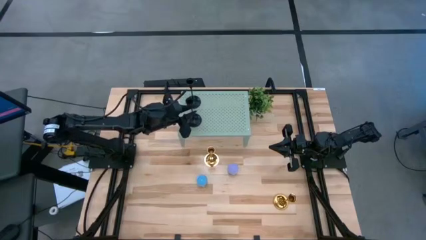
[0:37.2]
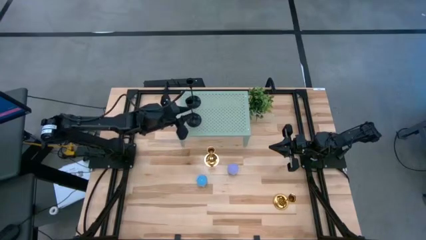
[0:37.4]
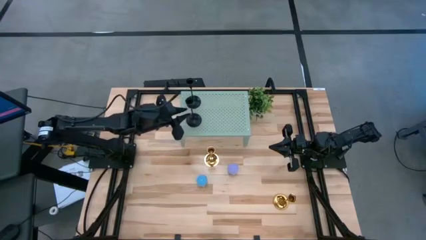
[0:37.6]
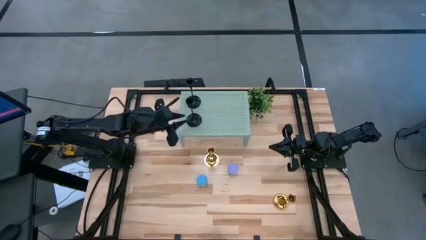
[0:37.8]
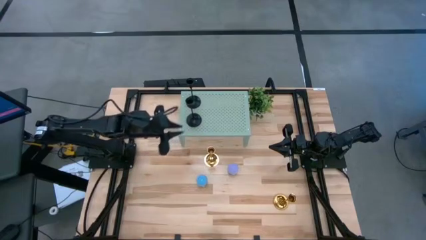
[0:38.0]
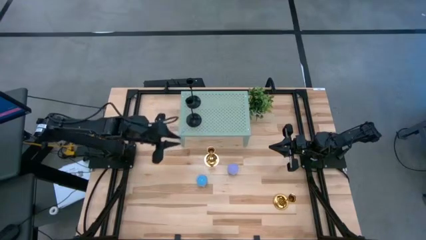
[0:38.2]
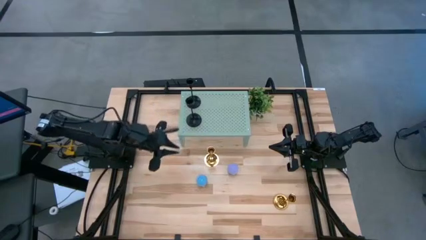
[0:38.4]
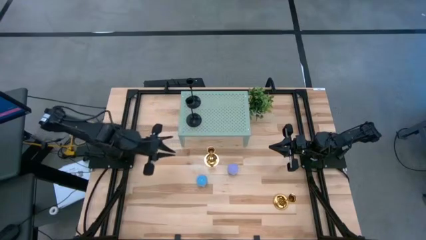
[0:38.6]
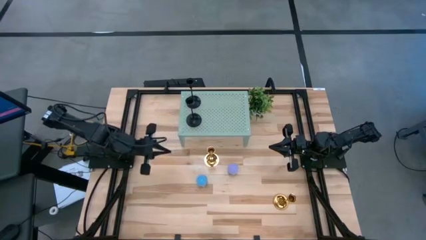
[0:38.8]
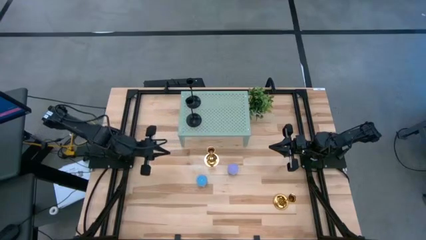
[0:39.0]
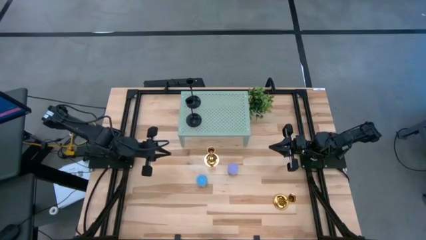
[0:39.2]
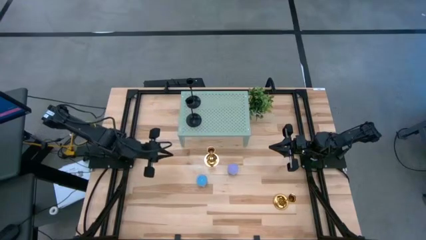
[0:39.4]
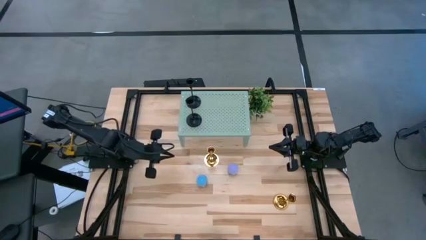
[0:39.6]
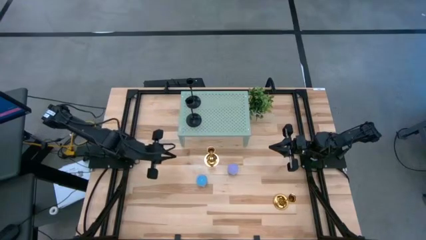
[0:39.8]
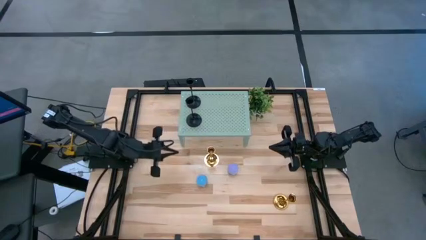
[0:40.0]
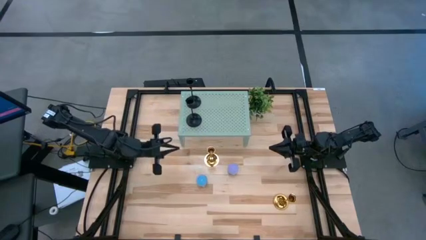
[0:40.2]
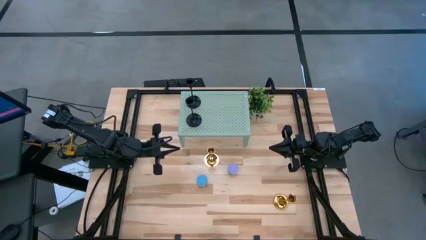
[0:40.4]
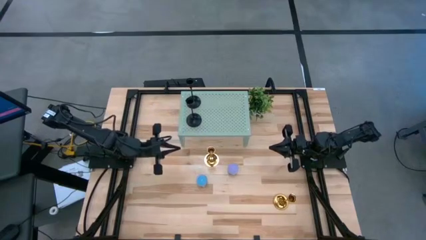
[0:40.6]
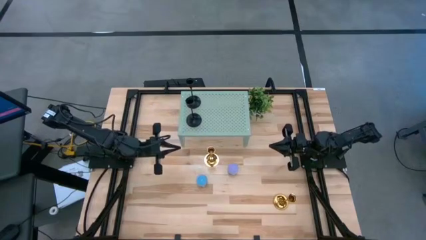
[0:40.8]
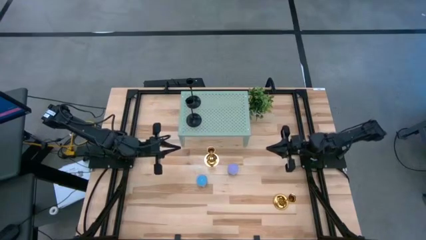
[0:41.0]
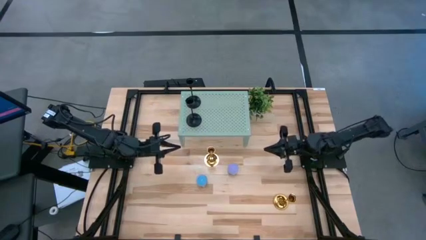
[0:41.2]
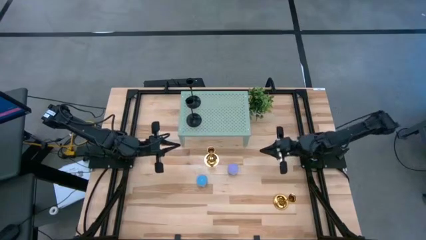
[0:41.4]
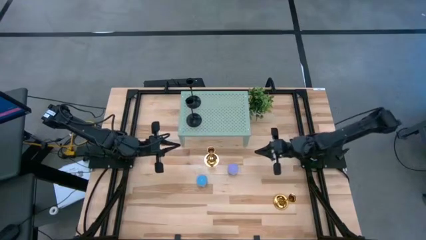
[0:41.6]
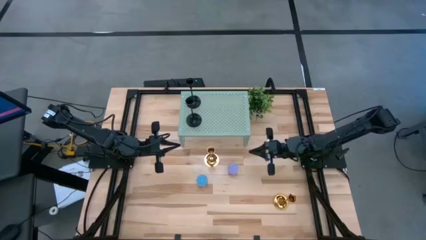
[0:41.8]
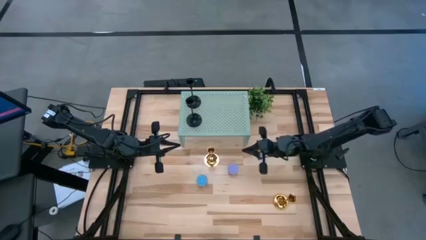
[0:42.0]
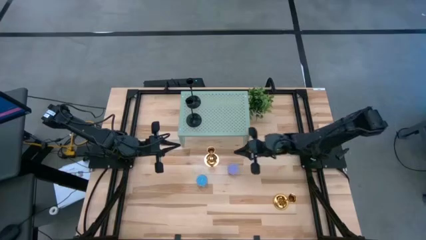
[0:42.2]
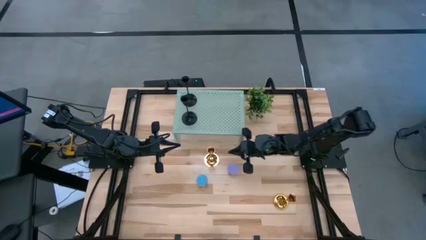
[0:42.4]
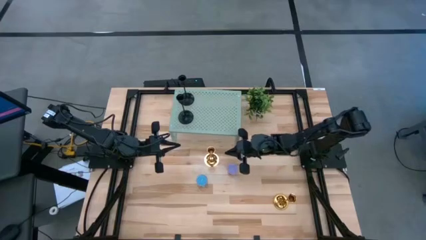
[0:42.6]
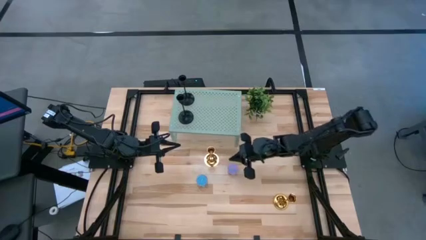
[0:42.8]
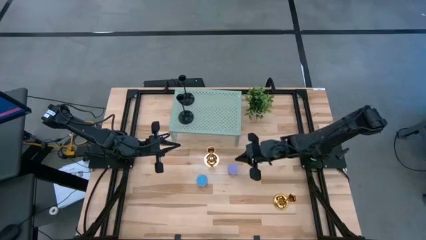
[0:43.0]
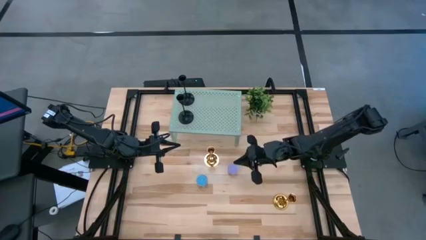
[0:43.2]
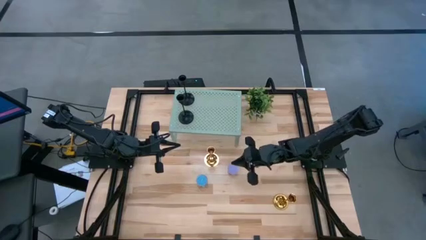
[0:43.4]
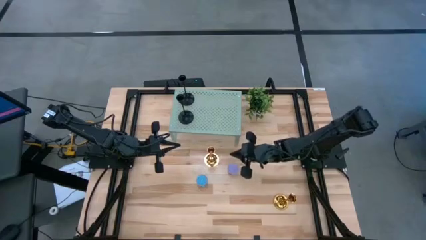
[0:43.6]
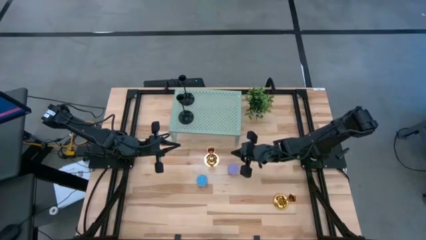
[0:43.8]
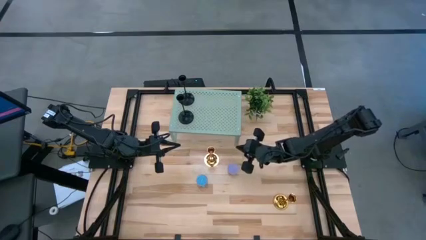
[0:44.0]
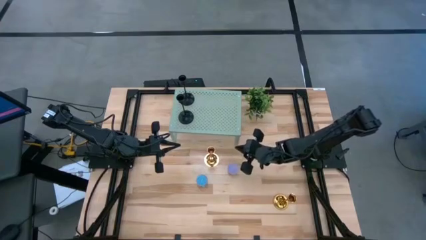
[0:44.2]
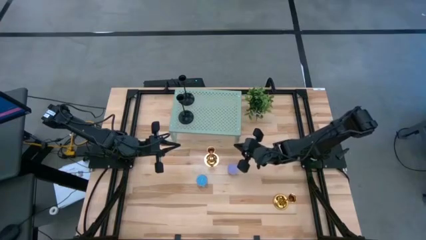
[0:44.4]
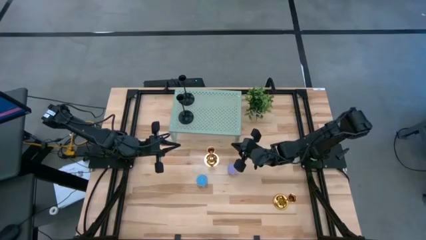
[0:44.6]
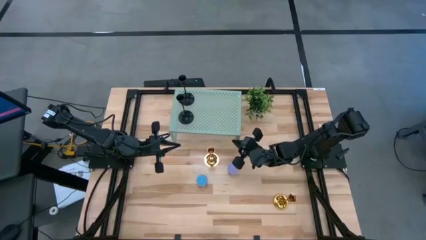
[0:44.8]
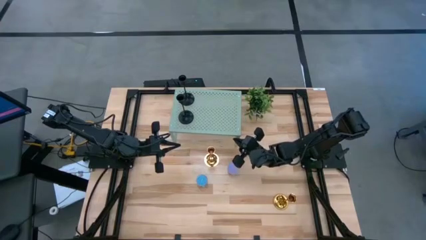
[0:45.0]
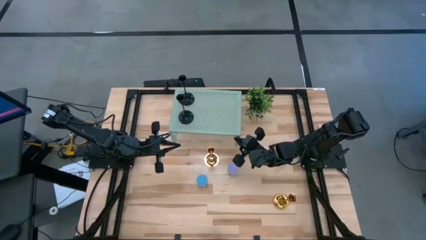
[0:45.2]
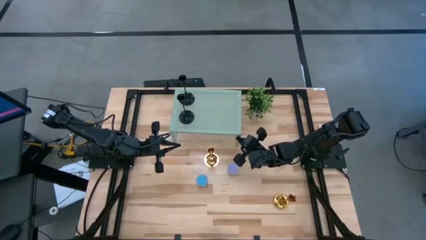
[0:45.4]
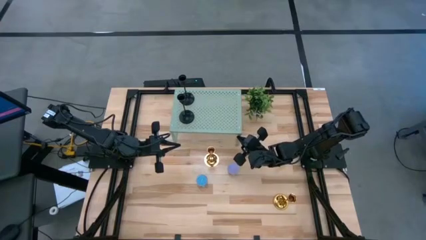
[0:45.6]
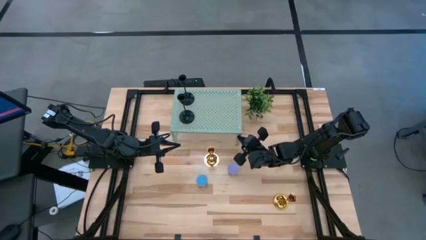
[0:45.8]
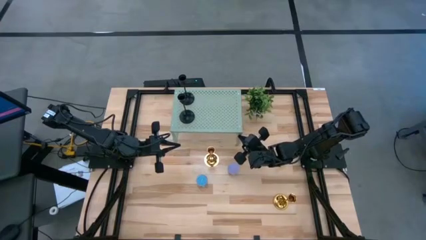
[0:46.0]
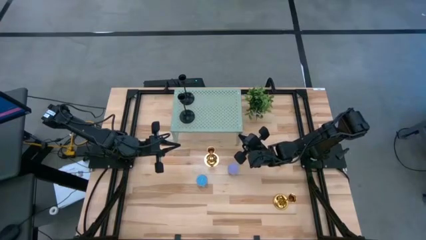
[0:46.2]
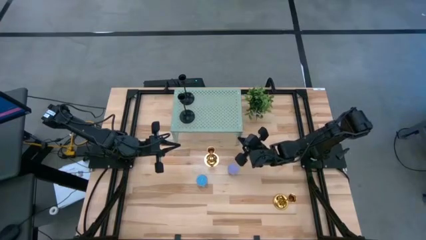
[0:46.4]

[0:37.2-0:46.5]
Task: Pick & Place candle stick holders
Adjust the shelf

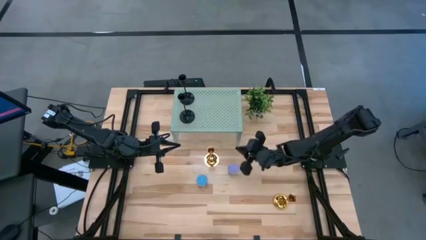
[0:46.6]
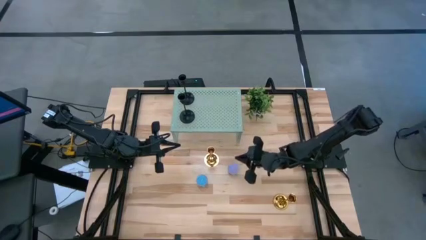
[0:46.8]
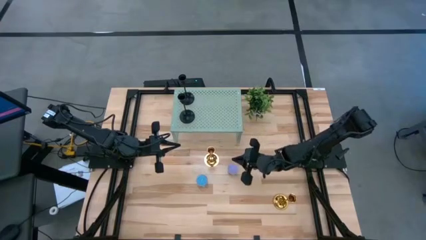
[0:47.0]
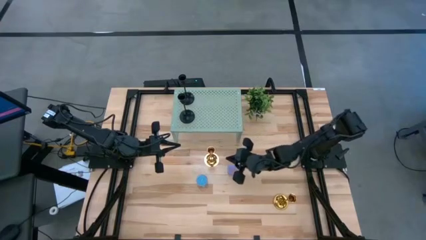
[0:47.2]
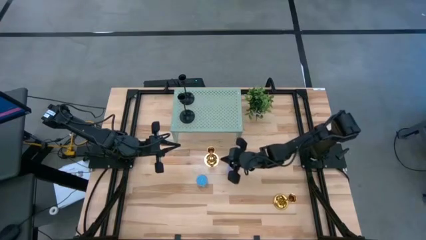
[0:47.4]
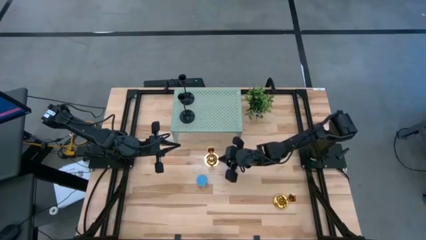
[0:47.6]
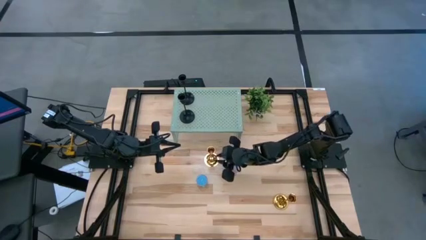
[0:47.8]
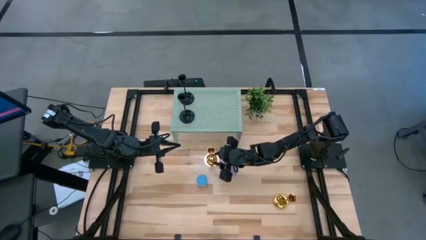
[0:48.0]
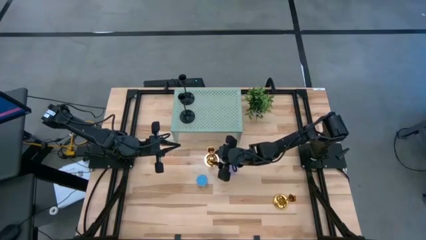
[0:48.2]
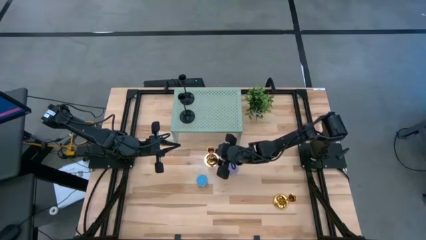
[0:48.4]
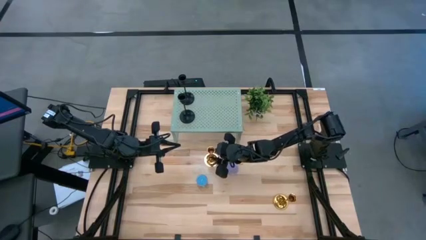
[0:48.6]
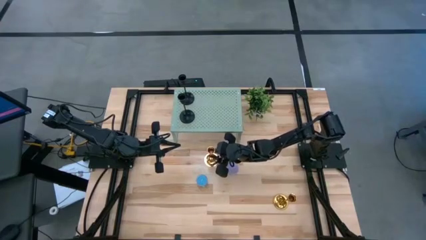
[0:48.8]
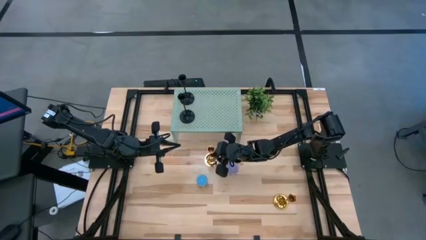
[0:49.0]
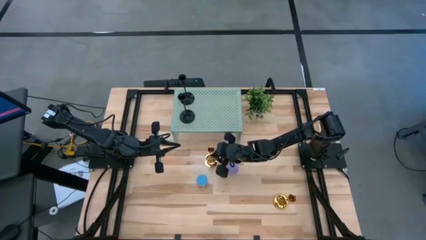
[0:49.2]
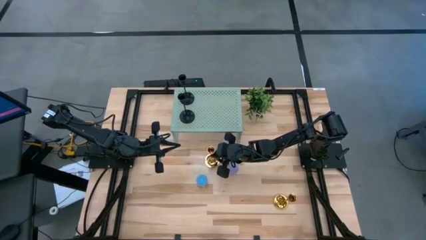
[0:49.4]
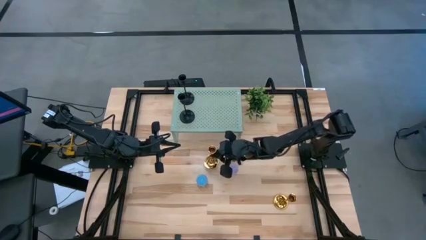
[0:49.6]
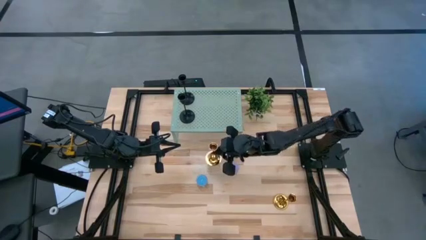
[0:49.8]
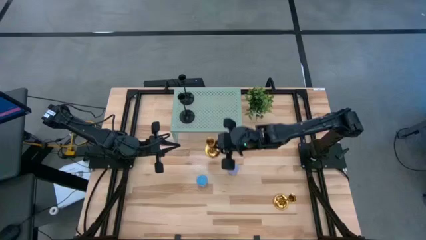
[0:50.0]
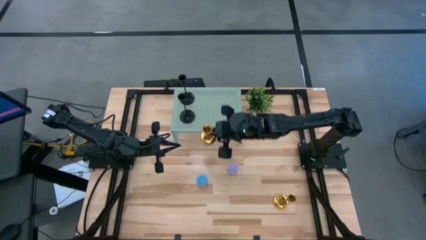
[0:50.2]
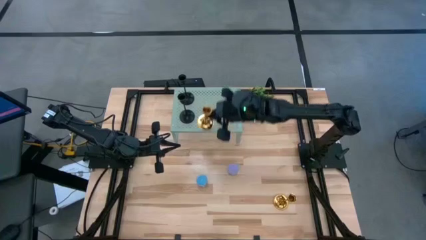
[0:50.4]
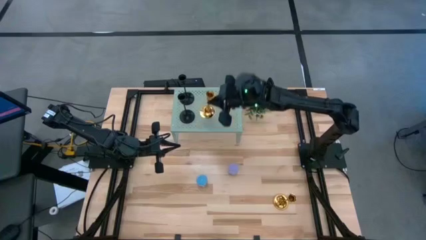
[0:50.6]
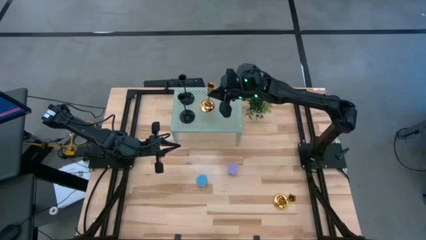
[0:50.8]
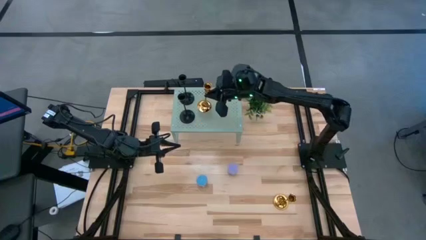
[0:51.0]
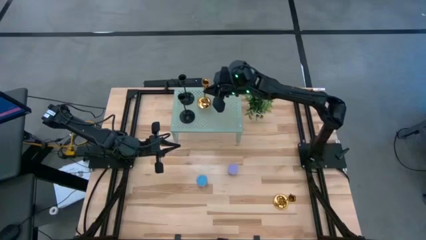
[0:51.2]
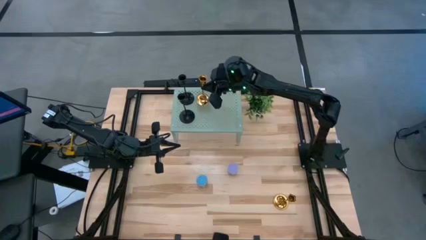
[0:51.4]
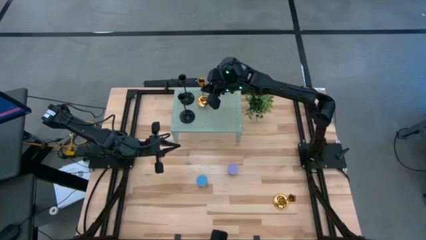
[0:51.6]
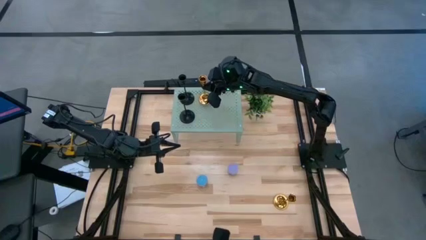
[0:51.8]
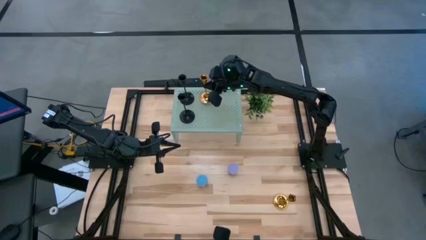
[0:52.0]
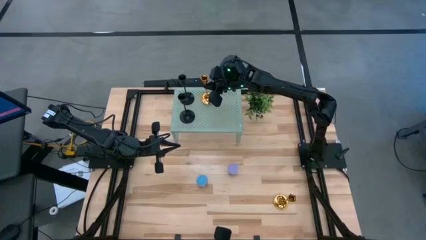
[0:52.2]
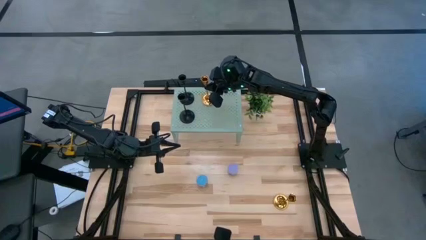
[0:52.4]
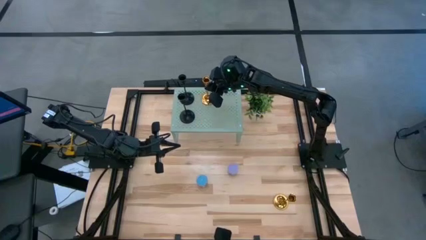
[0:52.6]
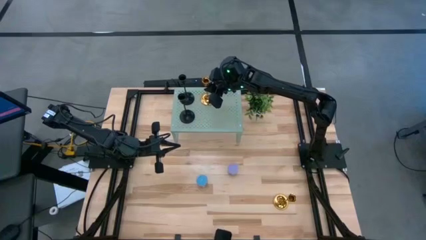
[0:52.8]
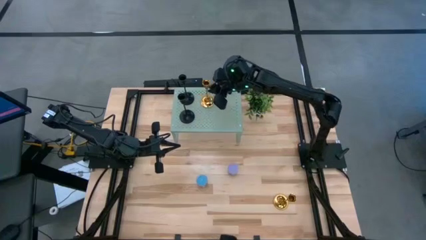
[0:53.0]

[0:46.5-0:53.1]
Put the top gold candle holder on the shelf
